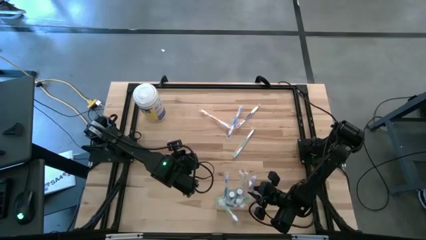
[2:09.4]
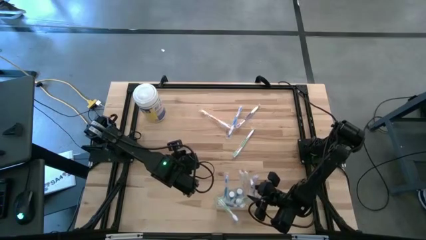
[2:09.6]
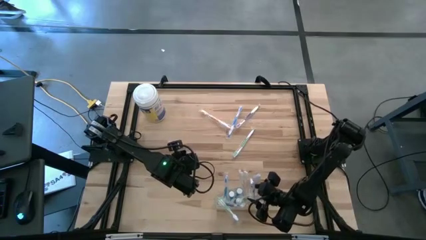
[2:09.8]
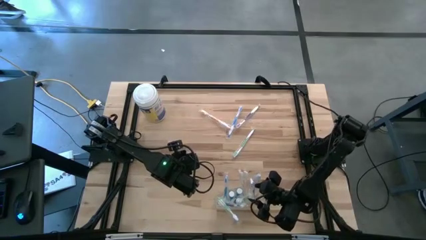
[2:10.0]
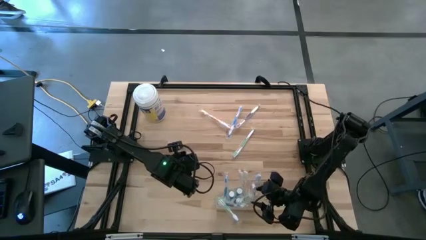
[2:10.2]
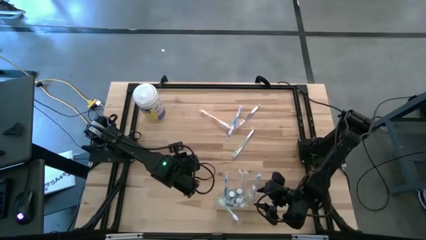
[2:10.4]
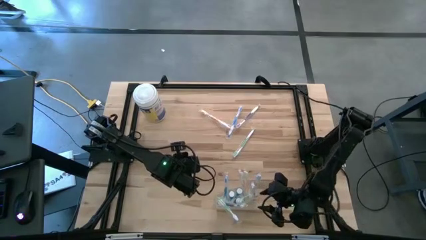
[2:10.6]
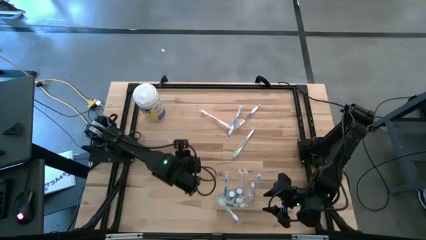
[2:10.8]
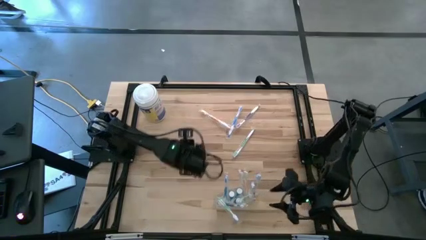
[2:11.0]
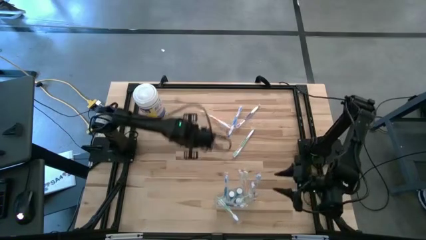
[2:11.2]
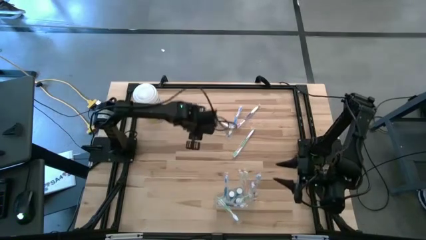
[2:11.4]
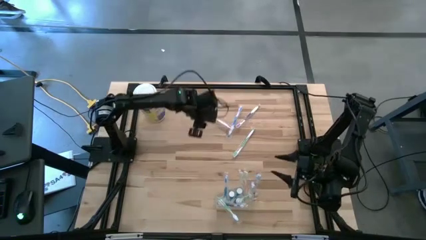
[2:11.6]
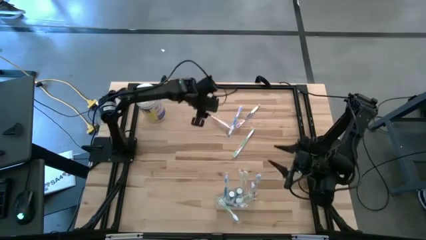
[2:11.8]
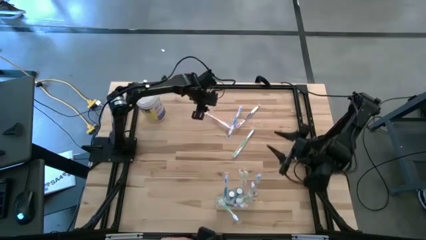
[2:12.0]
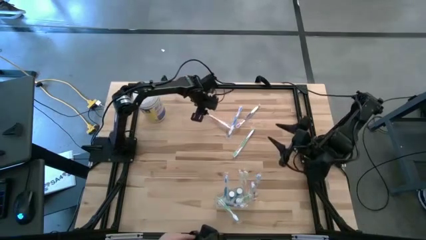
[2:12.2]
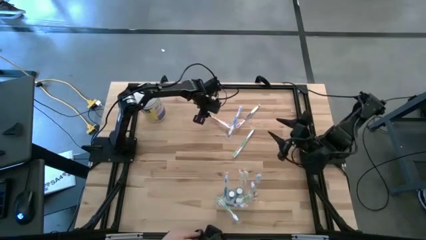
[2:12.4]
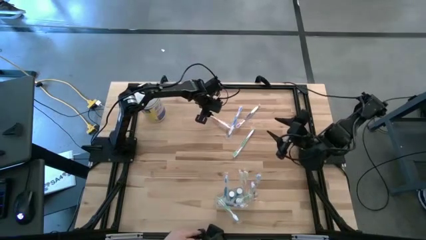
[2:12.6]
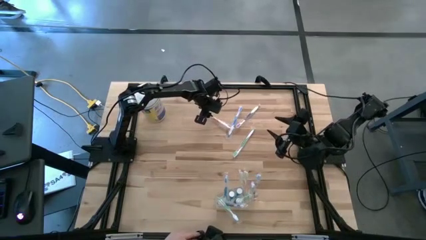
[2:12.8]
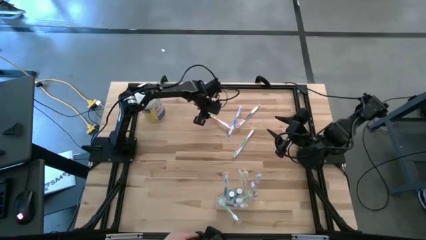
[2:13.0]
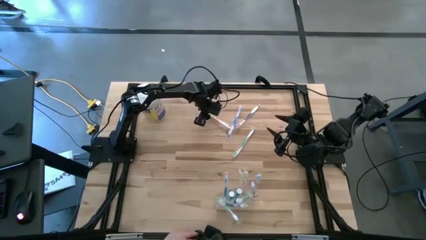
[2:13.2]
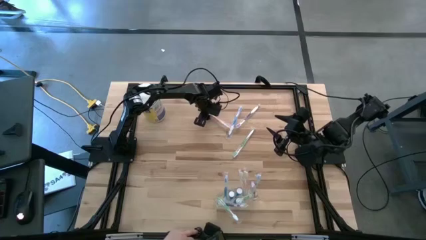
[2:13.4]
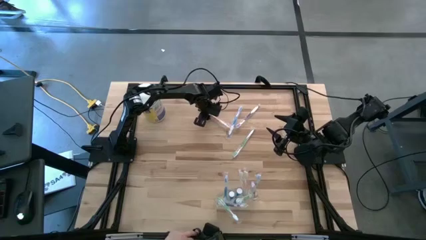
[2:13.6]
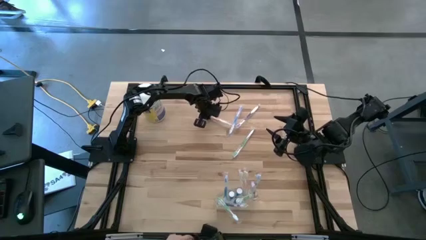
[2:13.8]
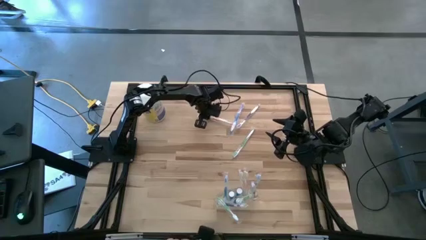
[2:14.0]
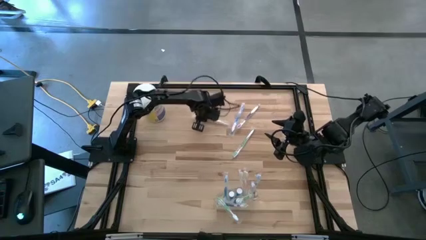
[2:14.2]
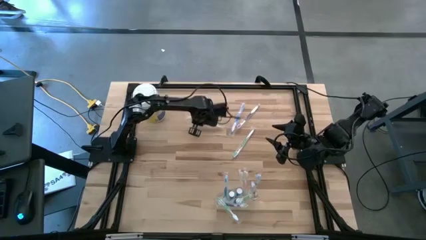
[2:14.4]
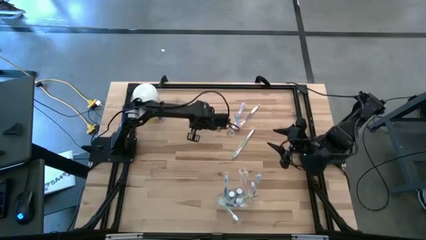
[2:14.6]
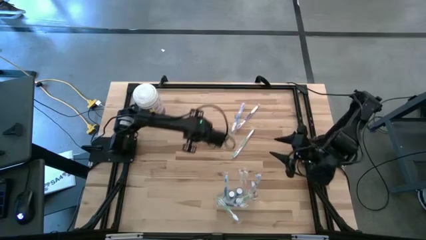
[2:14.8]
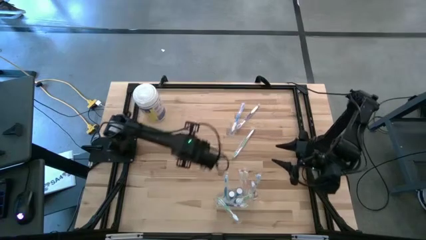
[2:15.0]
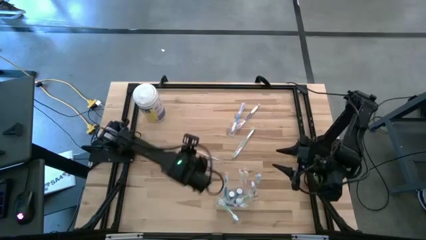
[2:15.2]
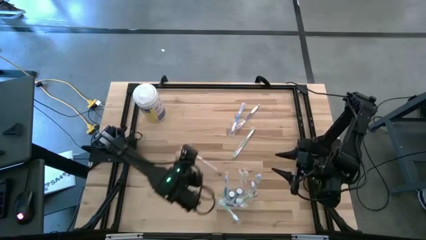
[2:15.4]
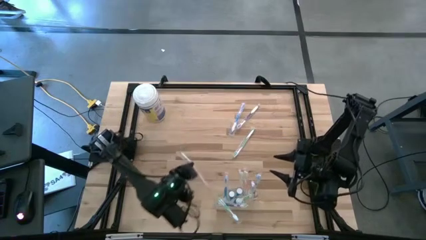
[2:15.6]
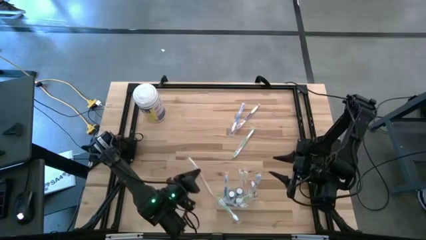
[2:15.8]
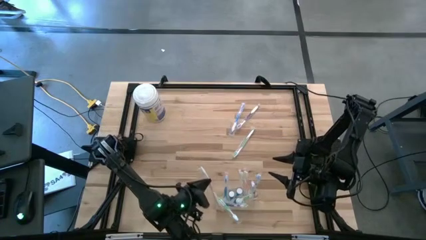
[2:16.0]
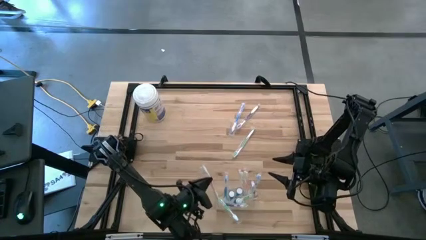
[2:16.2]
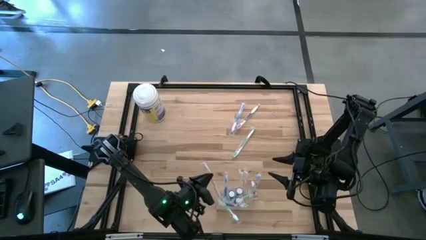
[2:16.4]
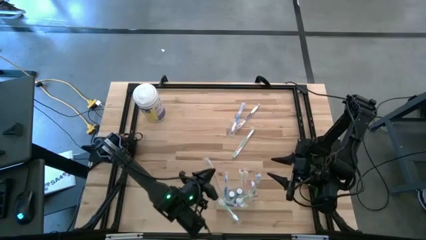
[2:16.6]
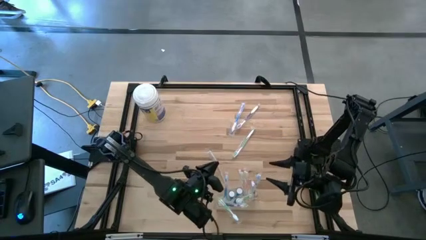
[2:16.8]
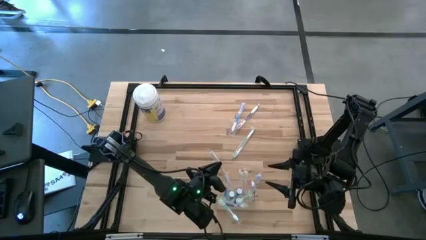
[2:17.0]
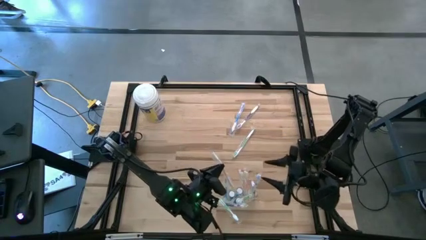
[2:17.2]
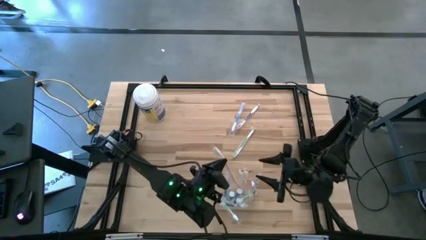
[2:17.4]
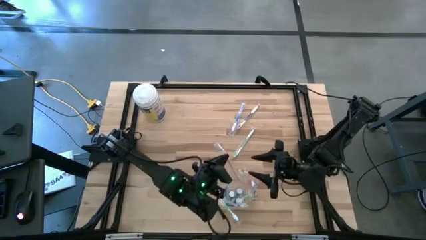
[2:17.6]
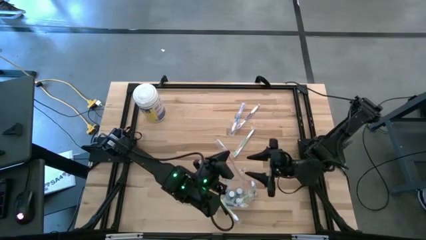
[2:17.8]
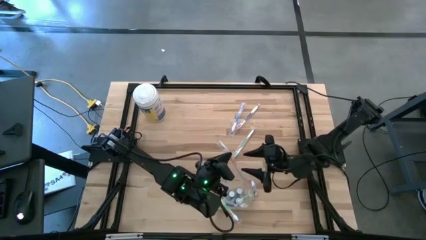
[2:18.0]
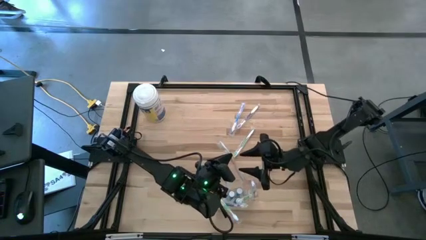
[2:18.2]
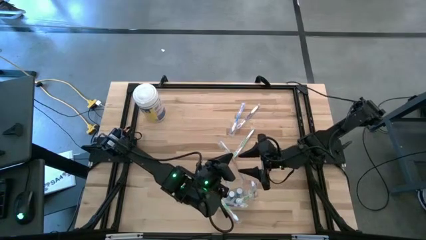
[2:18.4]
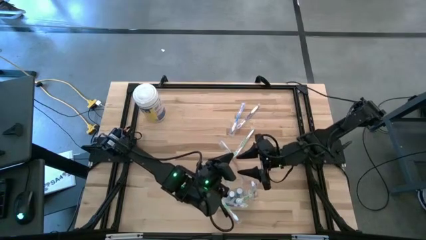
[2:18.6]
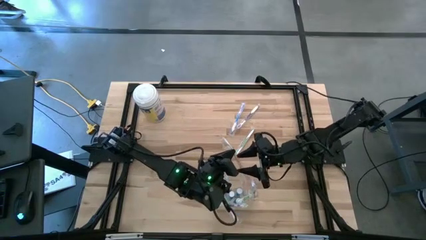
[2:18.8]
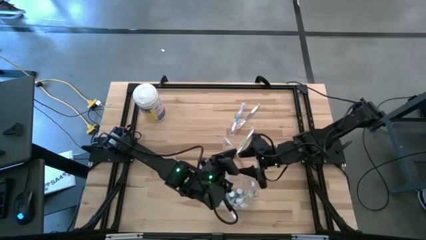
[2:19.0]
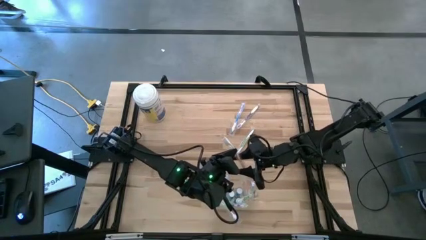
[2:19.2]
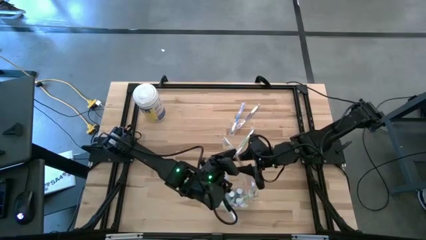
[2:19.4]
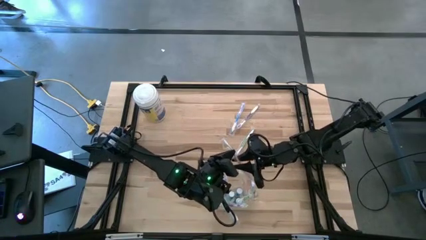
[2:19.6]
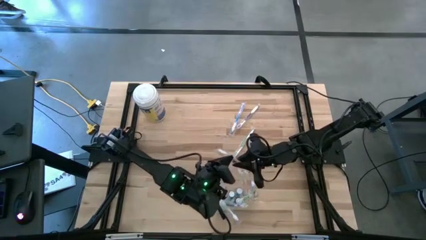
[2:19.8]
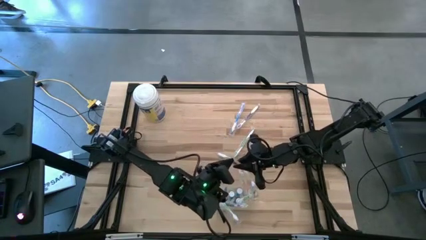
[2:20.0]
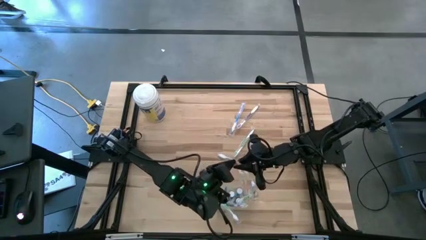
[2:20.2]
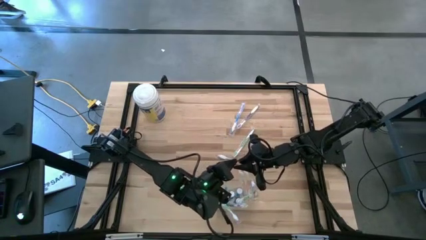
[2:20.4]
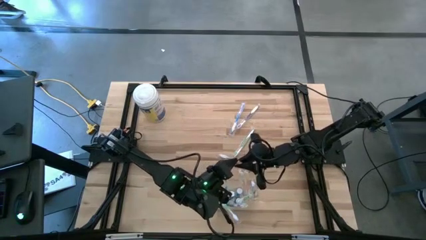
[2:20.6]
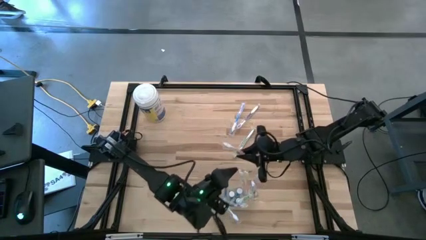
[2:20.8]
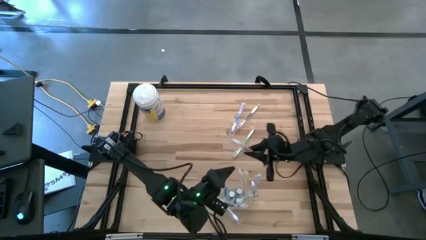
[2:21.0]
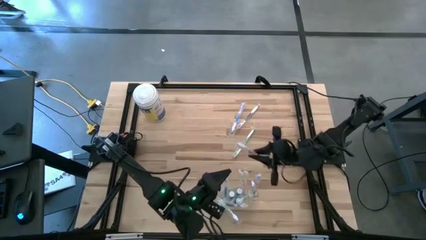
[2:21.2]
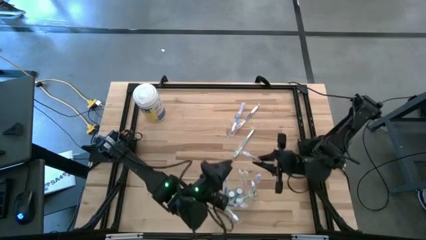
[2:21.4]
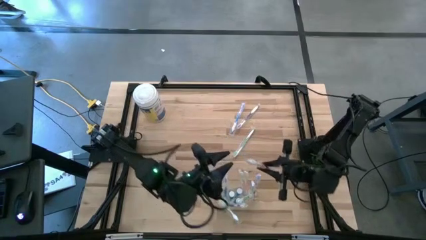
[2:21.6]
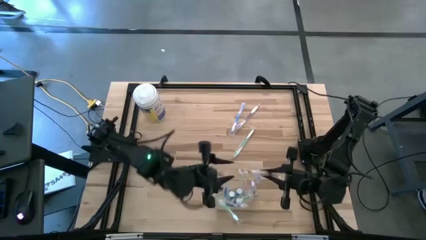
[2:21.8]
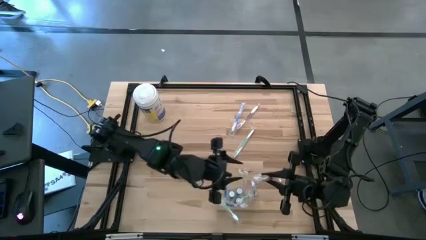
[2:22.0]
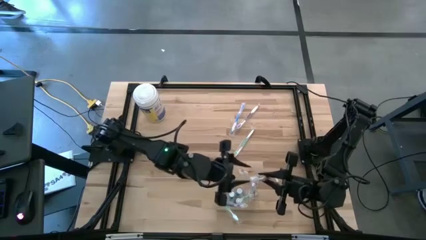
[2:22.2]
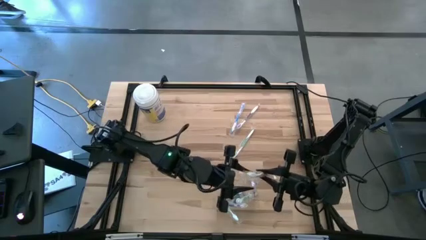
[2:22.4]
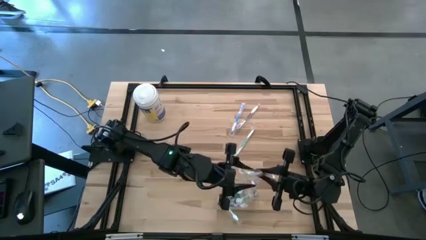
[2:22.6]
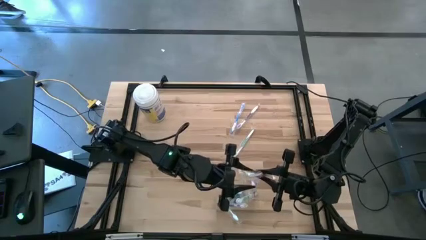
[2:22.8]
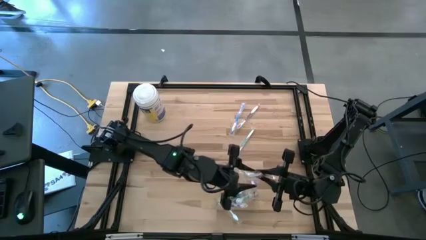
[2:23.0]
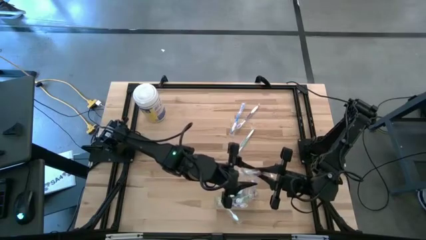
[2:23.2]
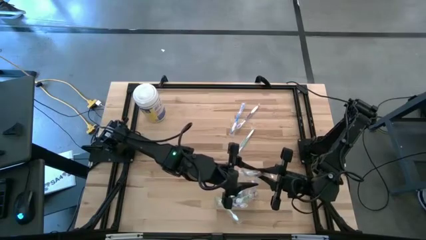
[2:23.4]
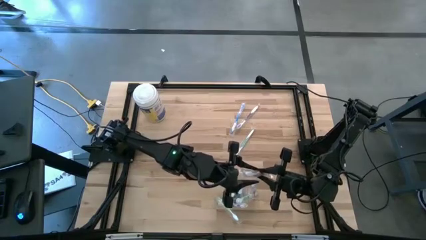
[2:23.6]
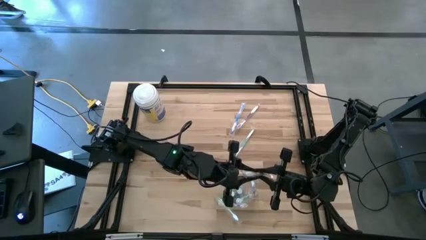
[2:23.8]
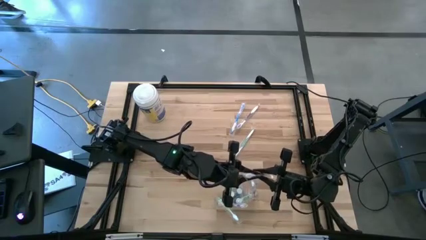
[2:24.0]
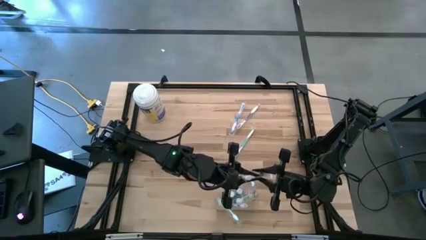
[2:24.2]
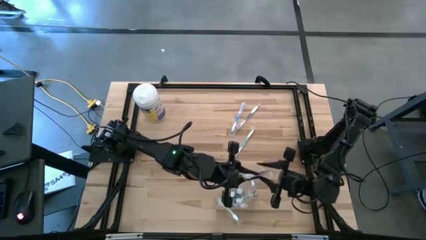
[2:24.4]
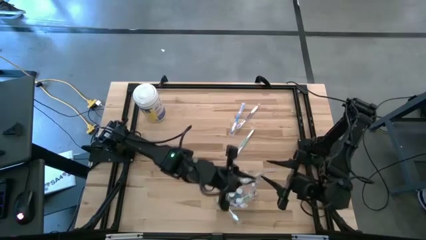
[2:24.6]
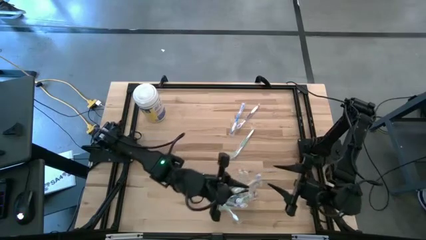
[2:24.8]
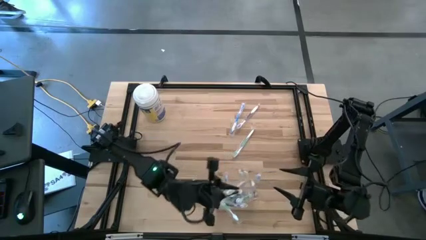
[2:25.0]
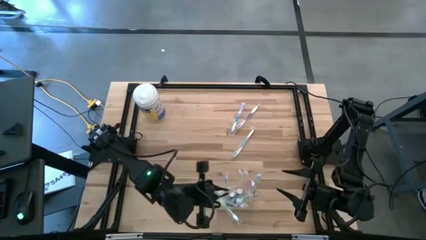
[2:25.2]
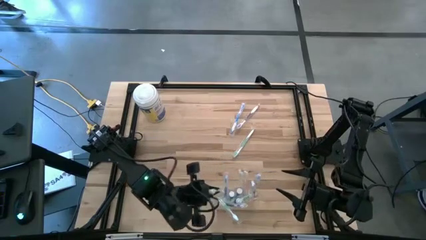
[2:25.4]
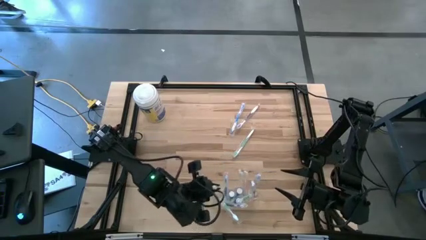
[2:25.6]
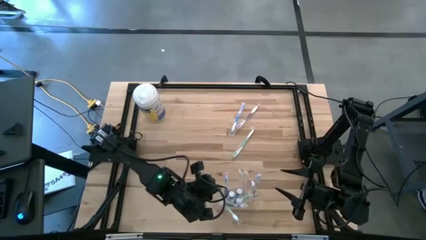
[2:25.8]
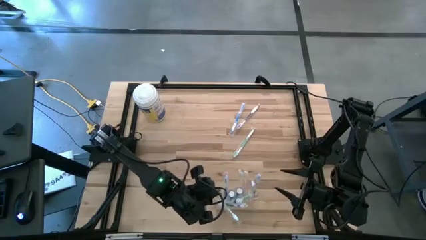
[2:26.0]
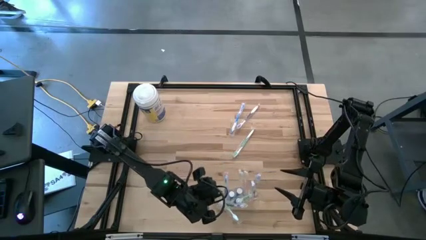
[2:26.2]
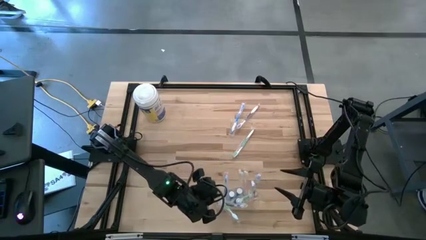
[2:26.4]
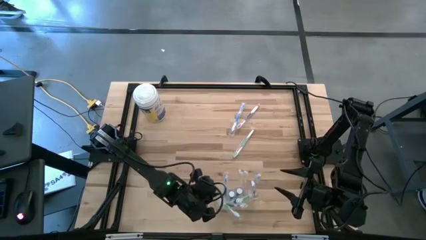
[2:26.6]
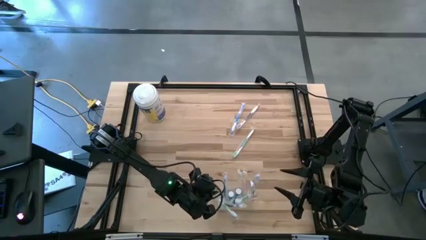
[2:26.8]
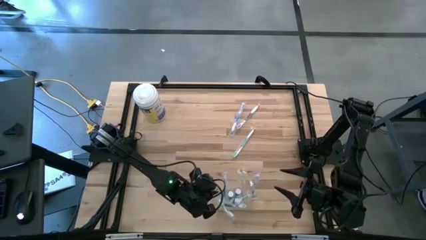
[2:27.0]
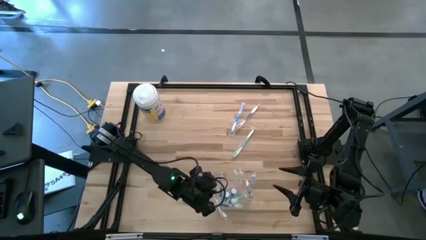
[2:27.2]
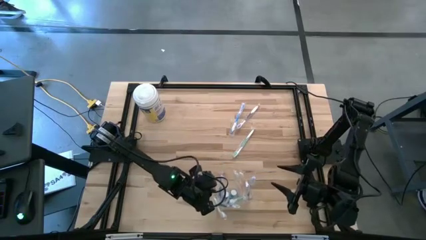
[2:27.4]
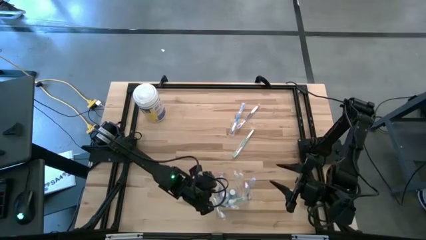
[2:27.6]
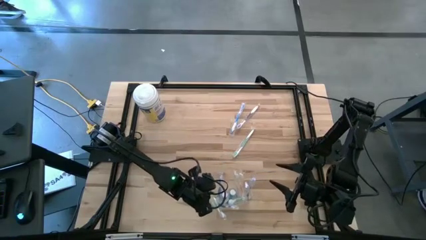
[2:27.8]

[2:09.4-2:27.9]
Task: Pick & Place toothbrushing station
Put the orange toothbrush into the transparent bin
